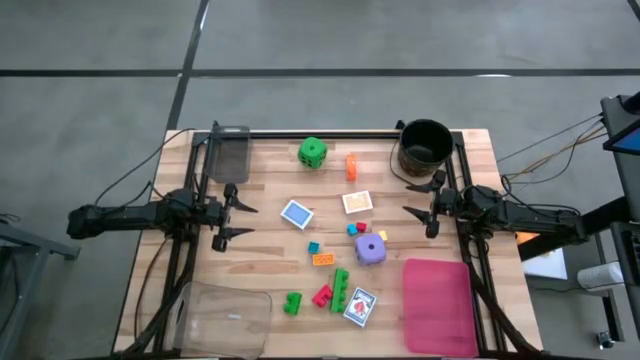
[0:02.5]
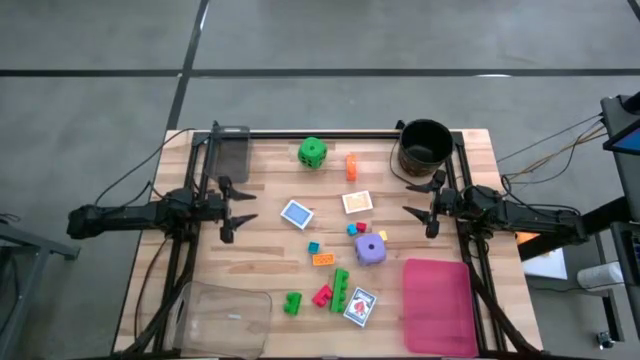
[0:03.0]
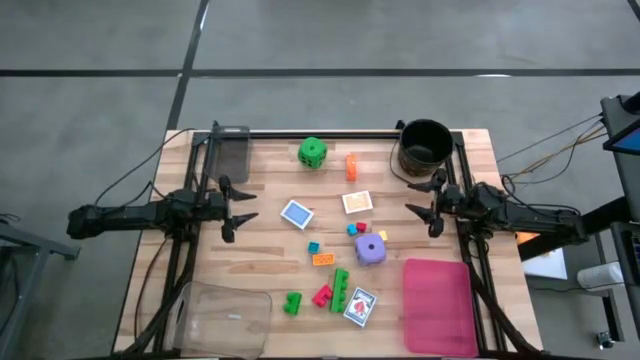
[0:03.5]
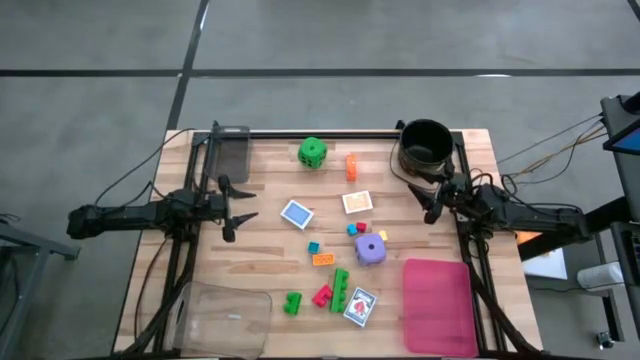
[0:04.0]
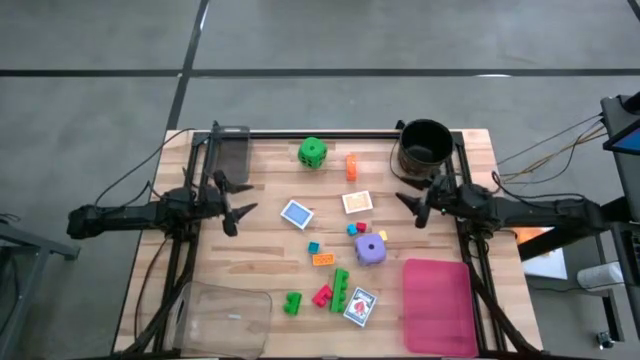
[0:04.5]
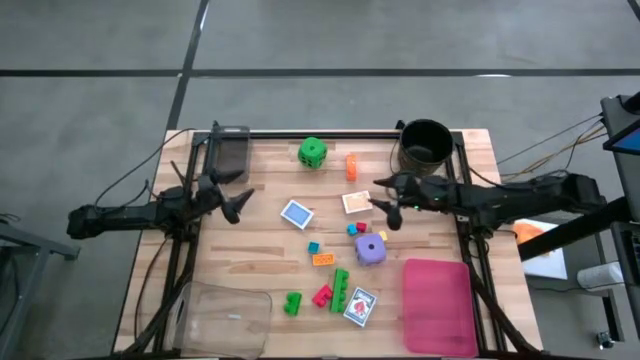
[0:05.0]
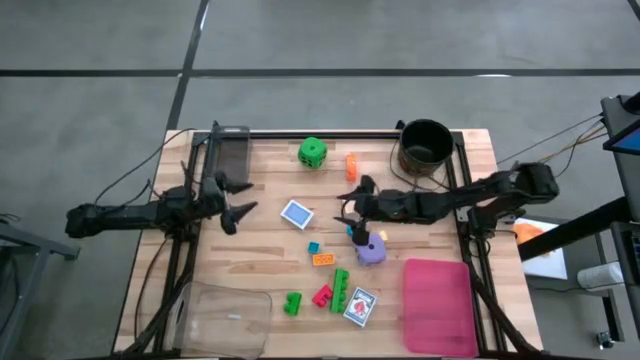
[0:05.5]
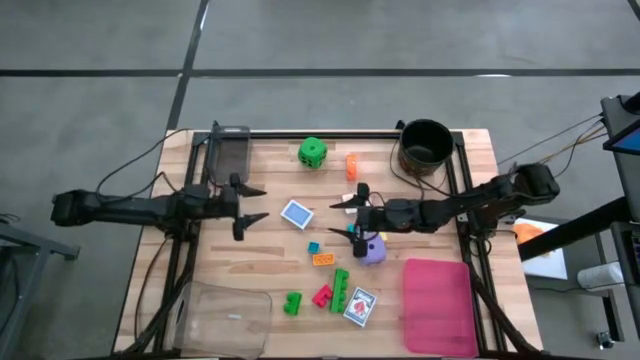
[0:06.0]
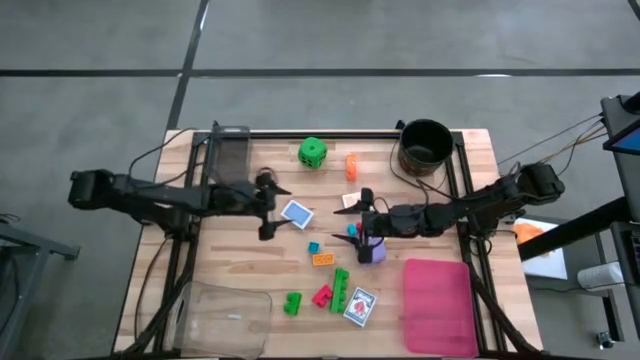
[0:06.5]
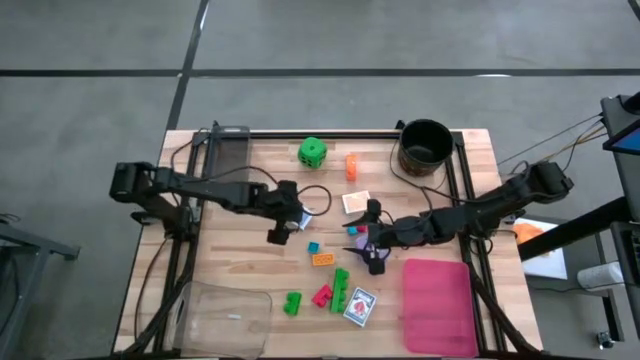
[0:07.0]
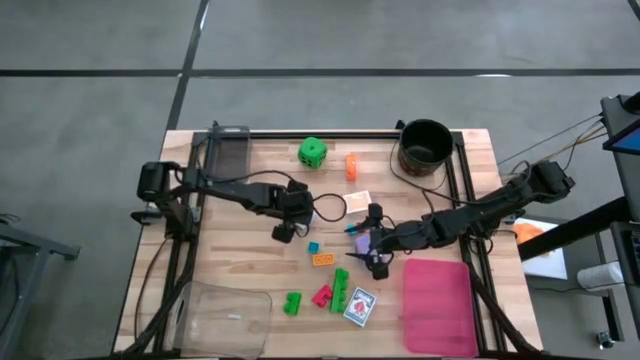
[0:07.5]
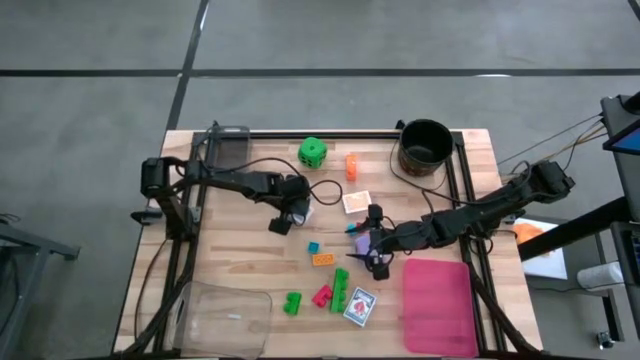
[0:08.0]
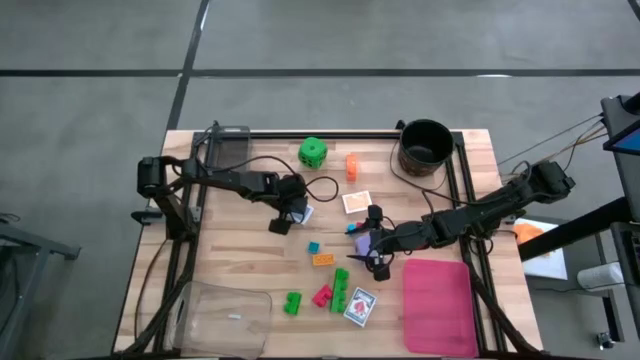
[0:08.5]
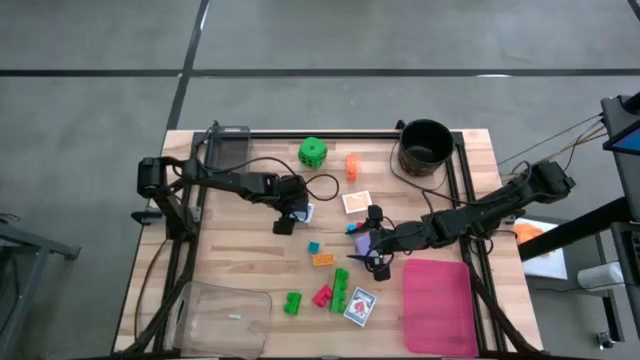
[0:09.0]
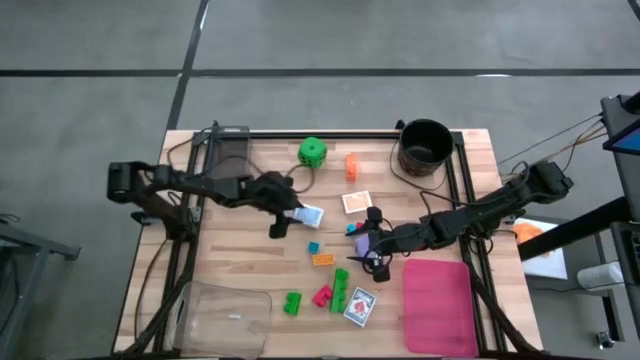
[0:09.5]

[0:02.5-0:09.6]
Task: Pick & Place Toys
Put the blue deck of cards into the black bin

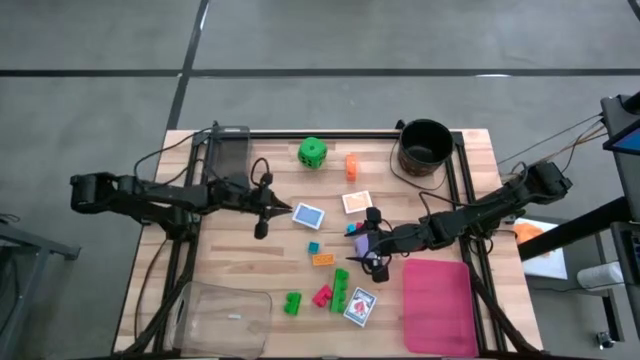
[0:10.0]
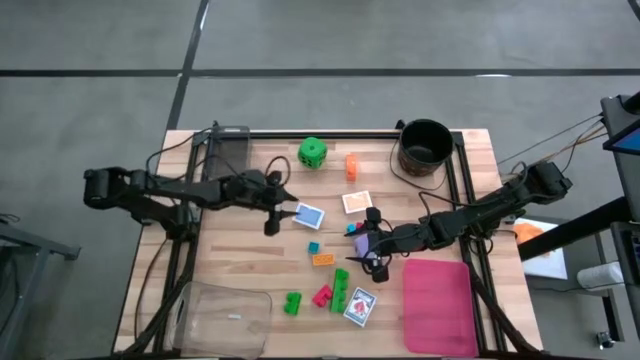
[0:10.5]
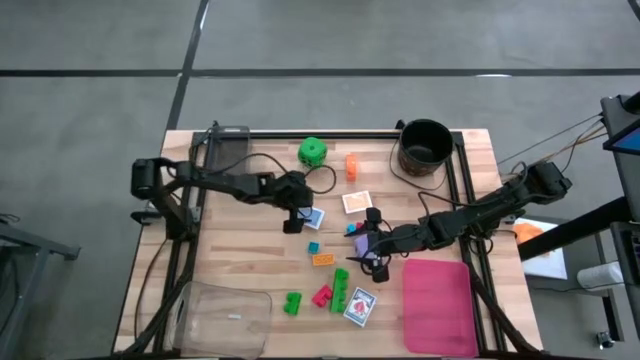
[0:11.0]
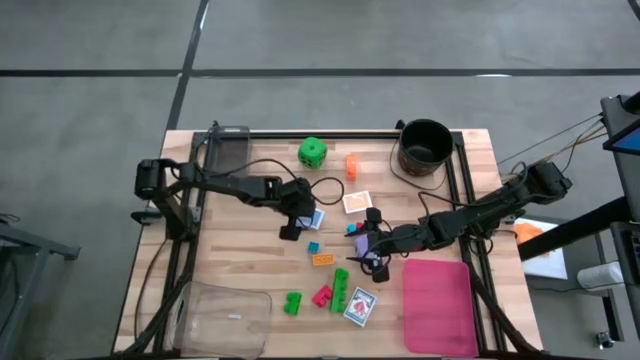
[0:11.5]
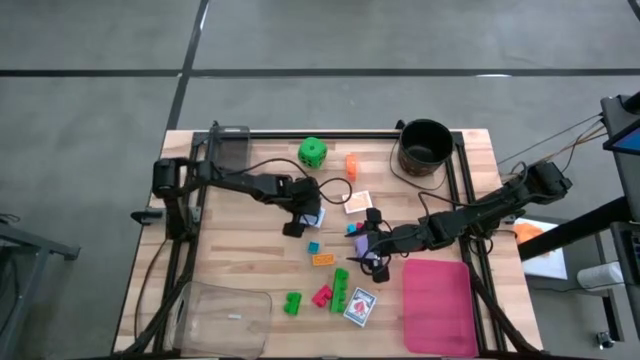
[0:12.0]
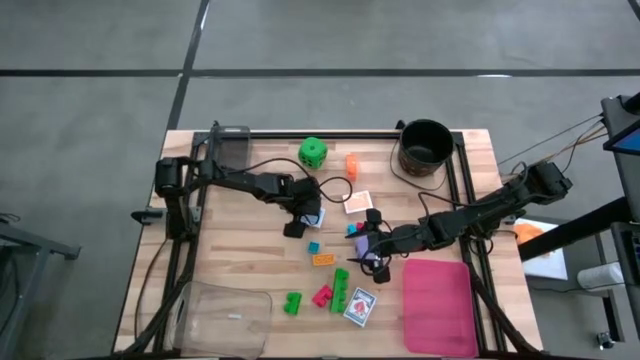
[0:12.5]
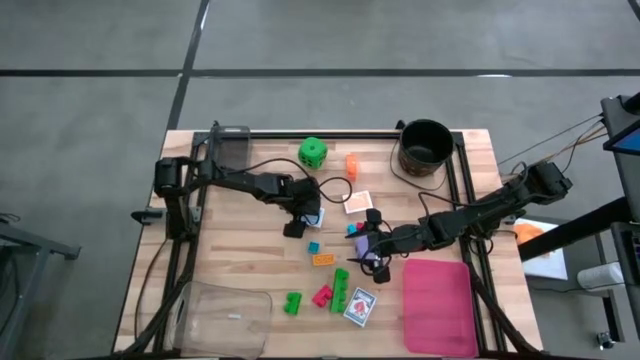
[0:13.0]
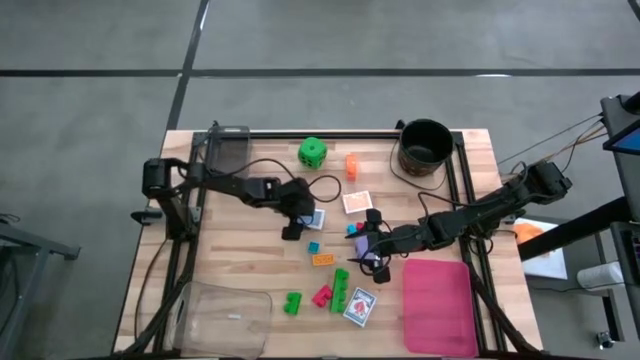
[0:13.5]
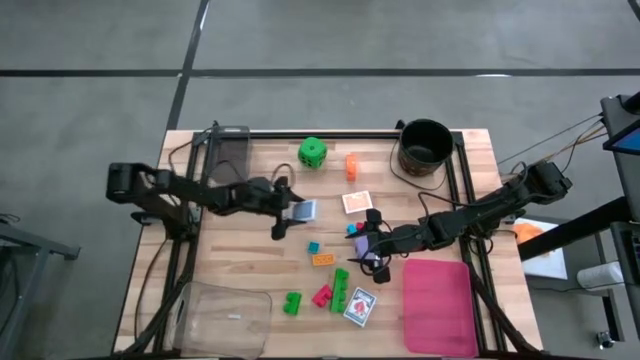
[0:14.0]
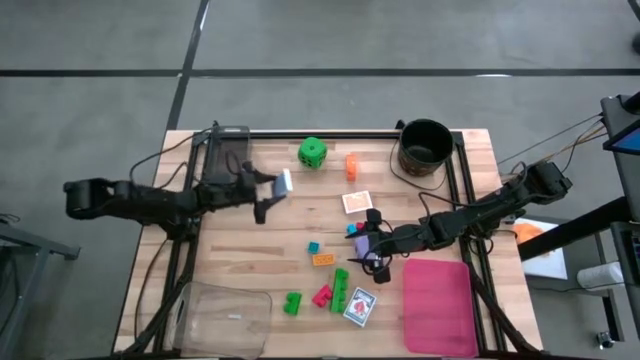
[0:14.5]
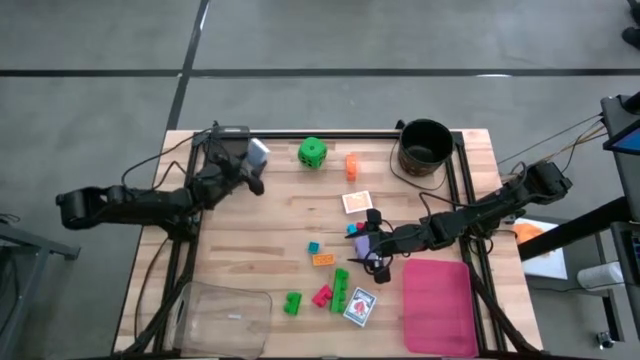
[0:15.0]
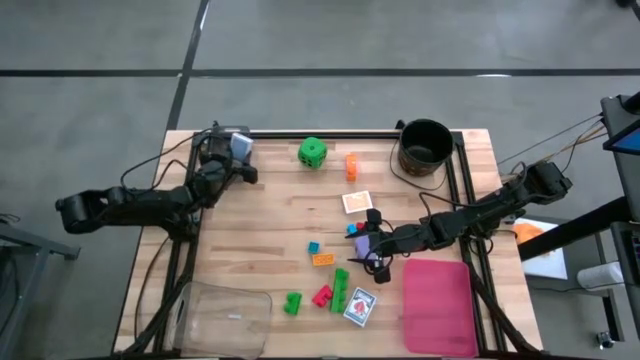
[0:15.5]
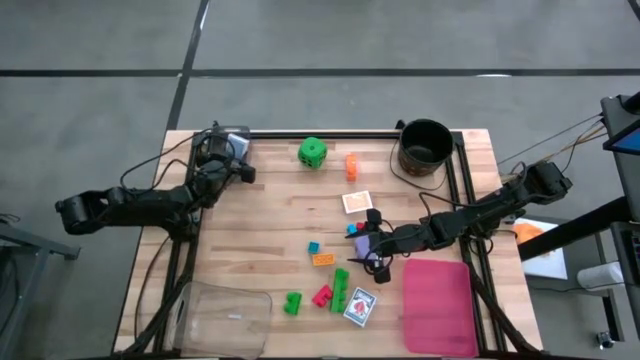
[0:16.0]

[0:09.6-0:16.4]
Put the blue deck of cards into the black bin

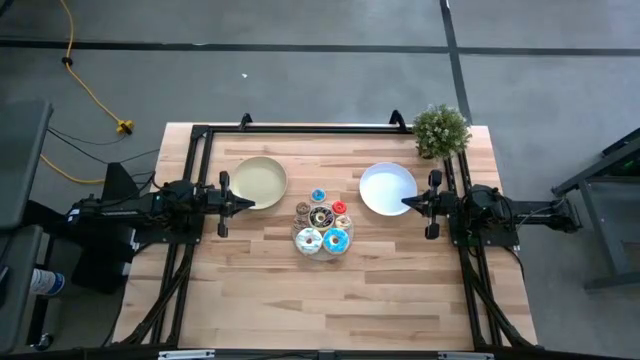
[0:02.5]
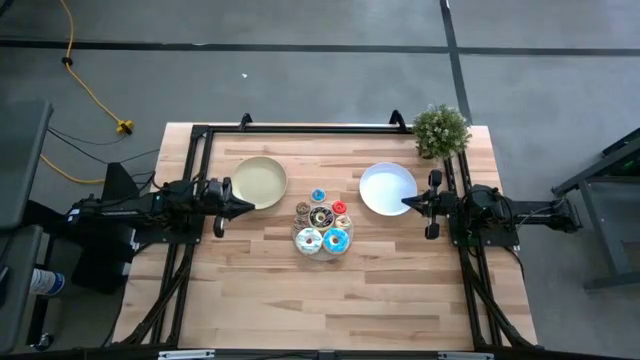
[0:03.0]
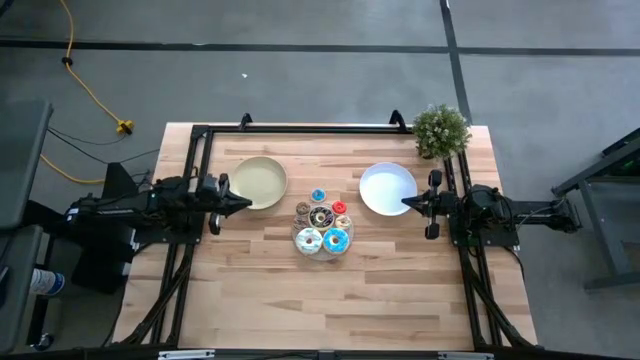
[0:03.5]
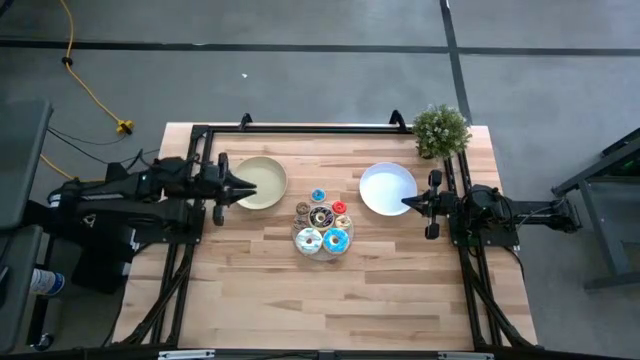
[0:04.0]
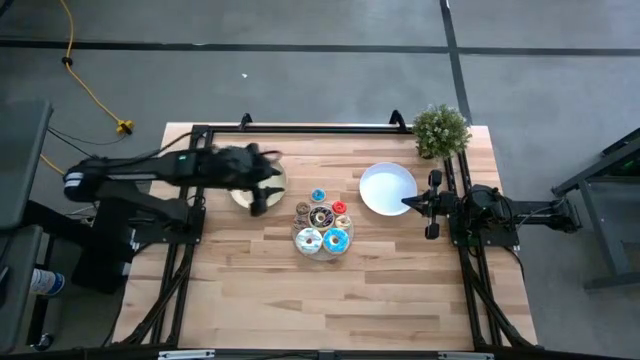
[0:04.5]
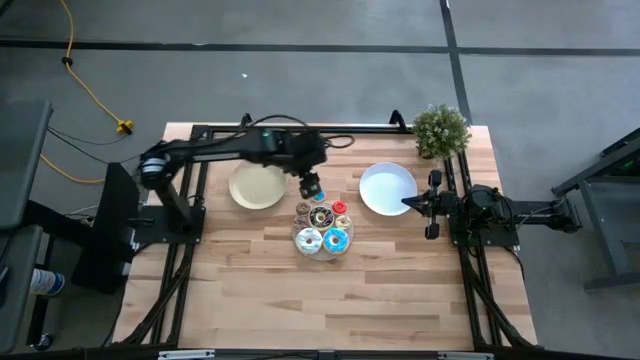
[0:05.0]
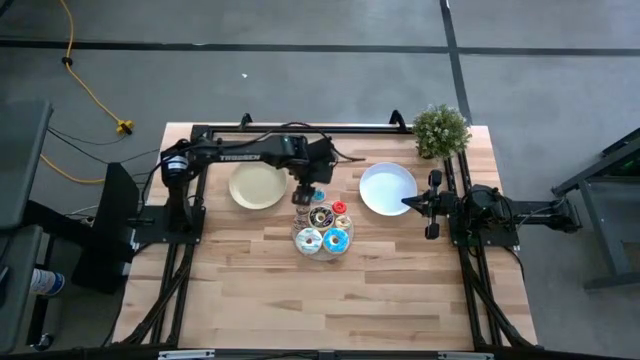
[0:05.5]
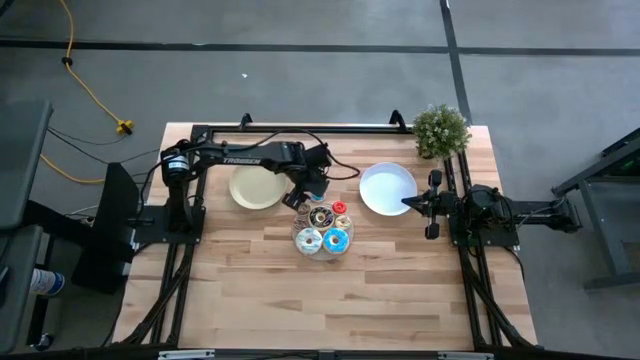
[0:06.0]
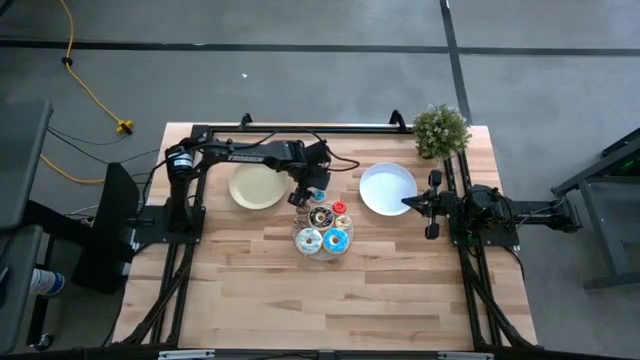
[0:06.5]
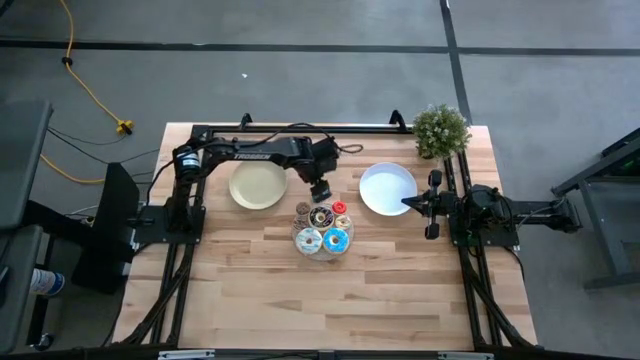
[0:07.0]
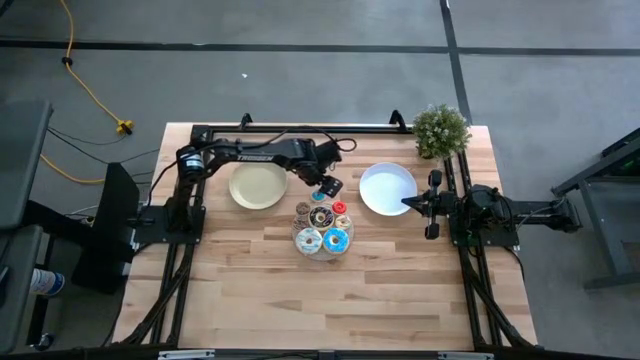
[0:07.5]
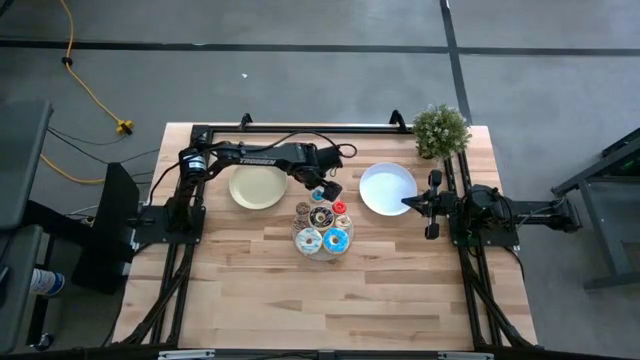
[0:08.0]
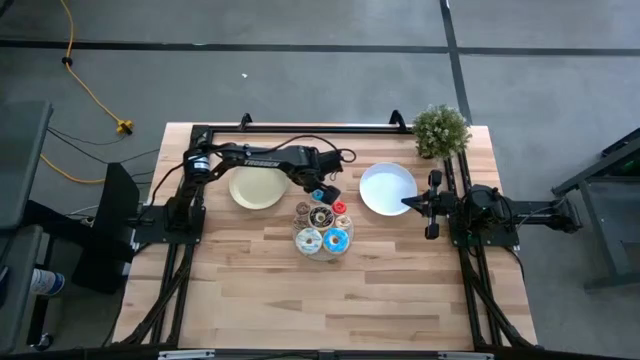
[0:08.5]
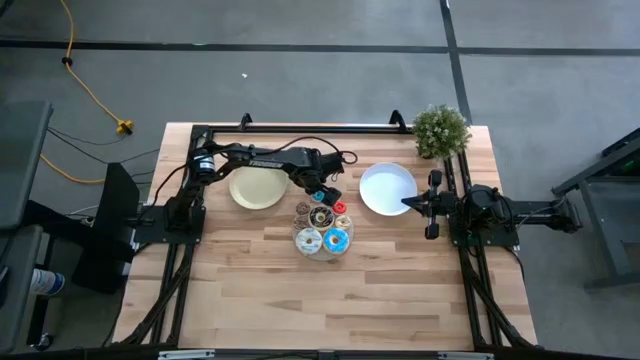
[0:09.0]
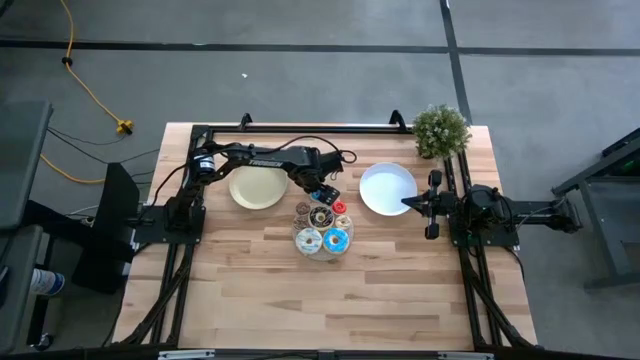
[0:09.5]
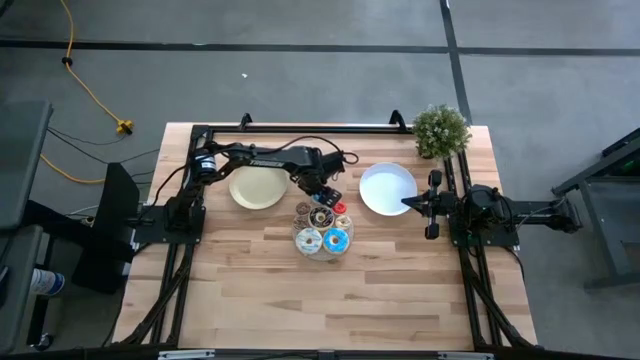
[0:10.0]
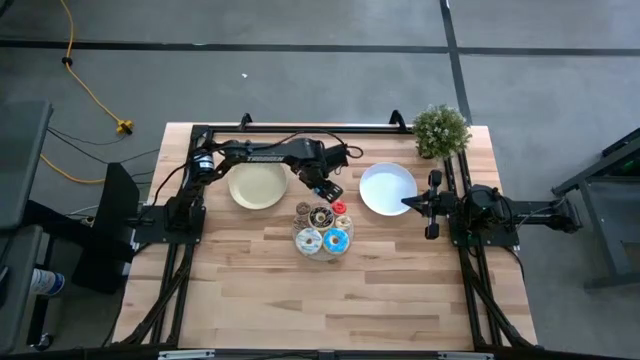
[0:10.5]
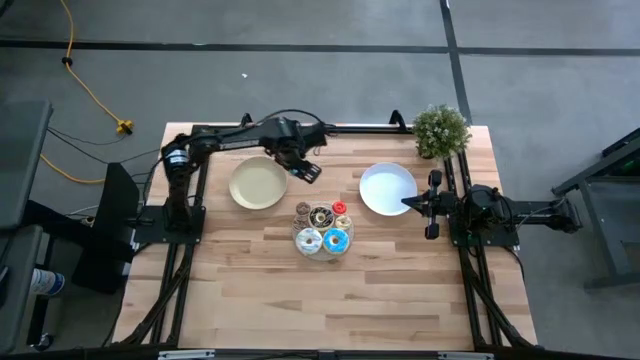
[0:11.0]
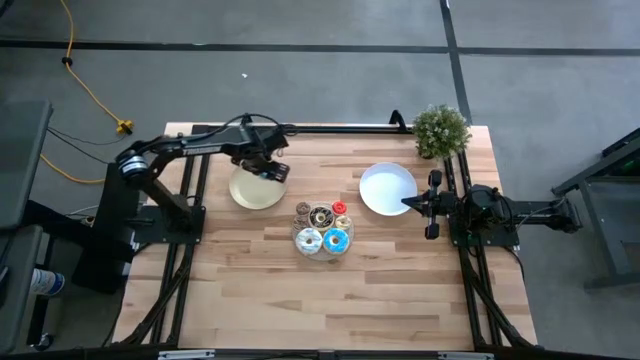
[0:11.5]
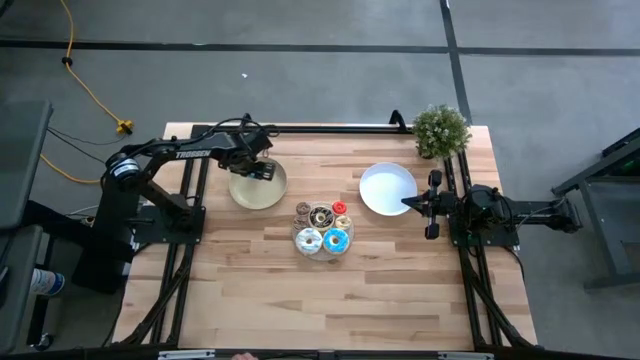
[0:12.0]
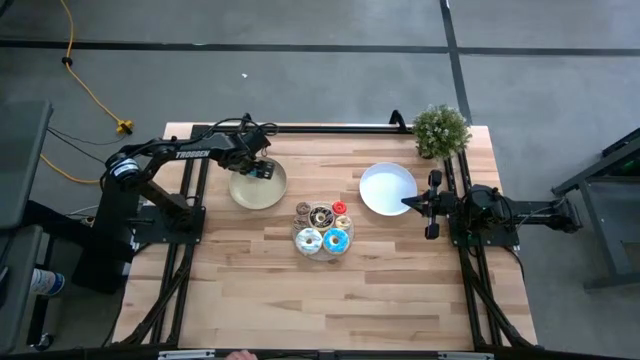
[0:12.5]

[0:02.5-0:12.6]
Task: Pick & Place donuts
Put the small blue donut on the brown plate
